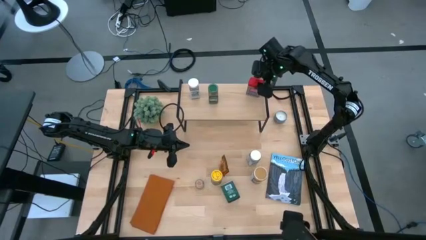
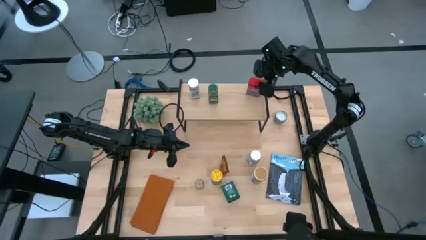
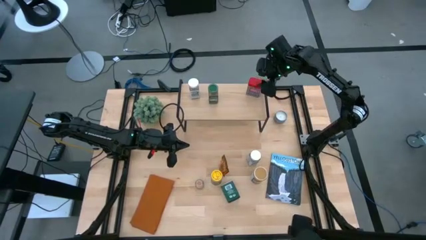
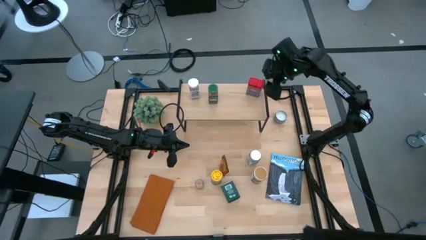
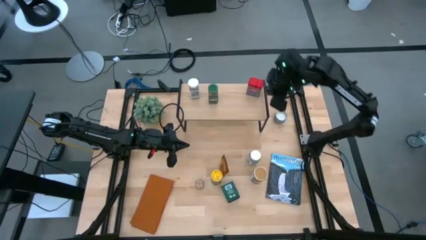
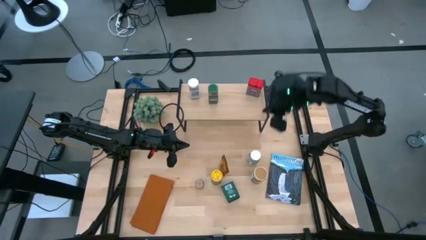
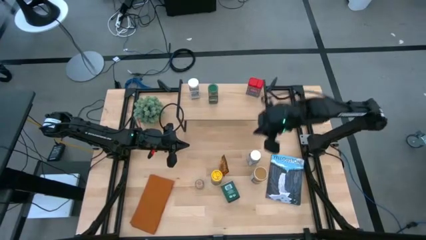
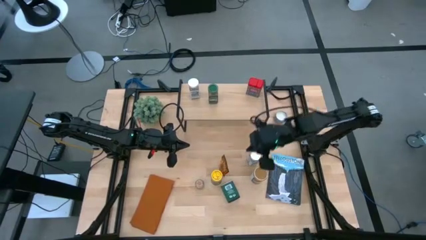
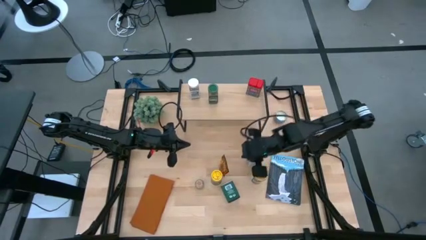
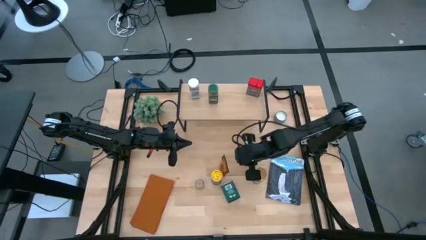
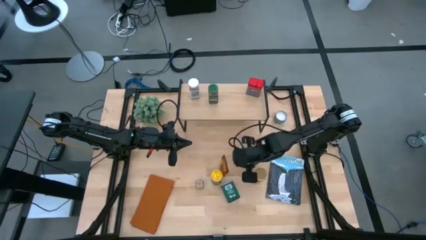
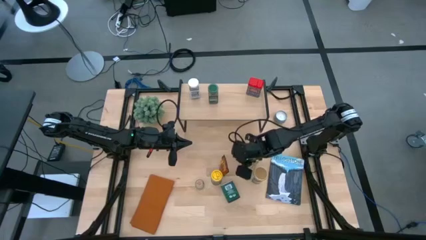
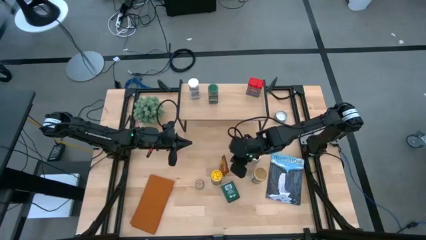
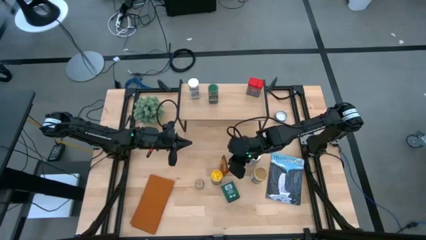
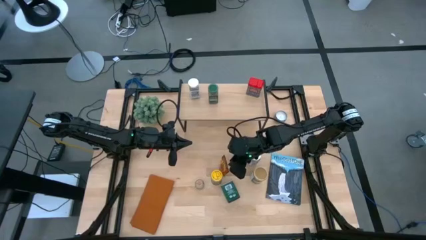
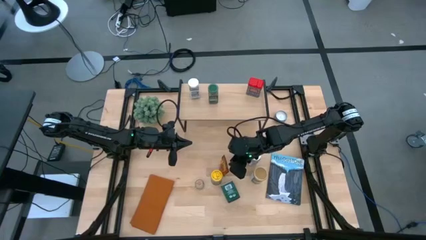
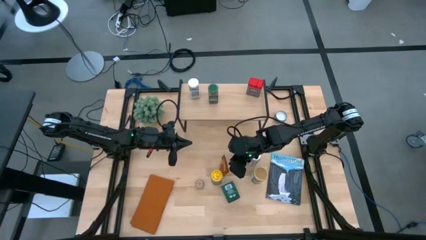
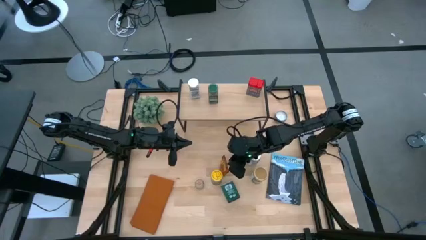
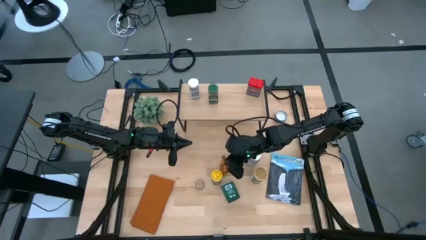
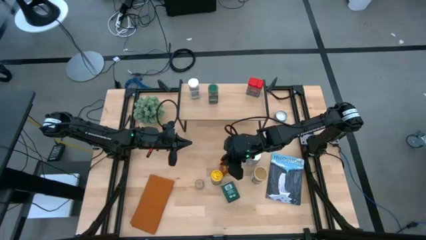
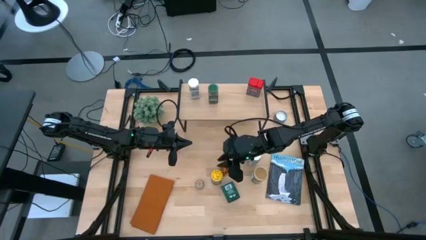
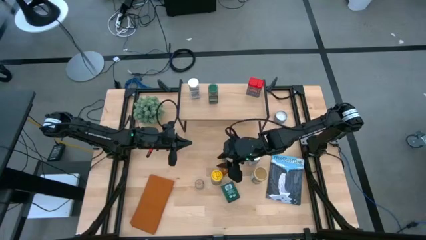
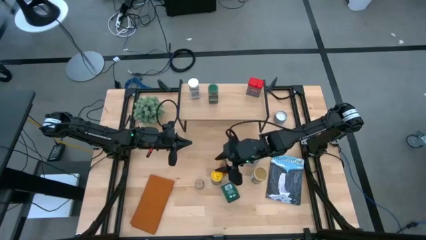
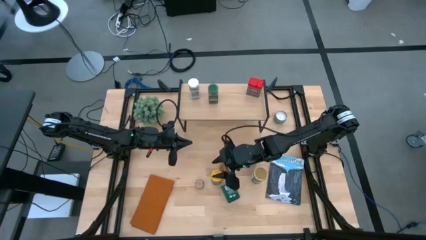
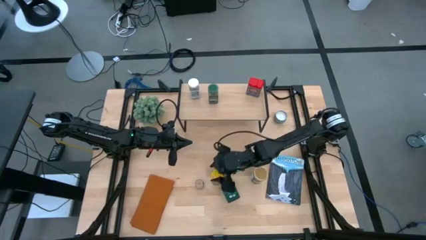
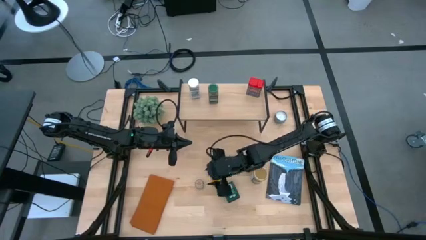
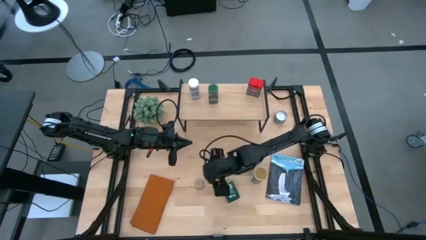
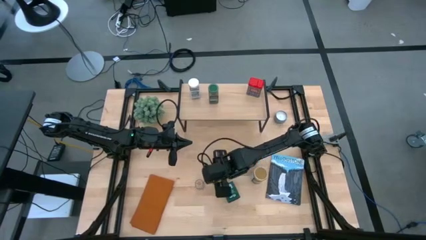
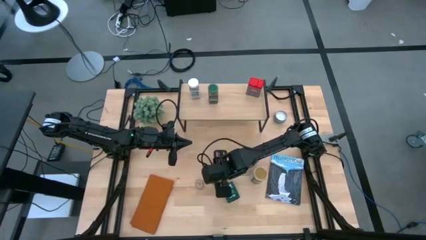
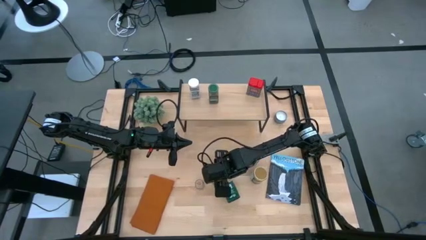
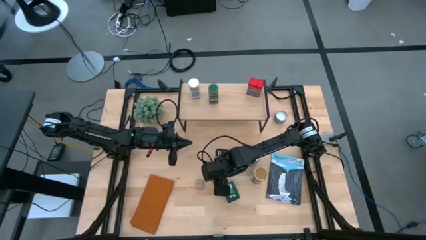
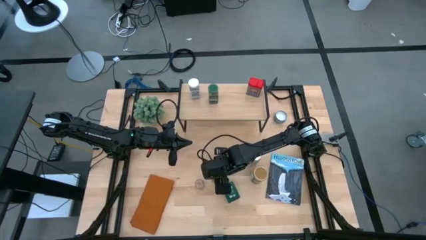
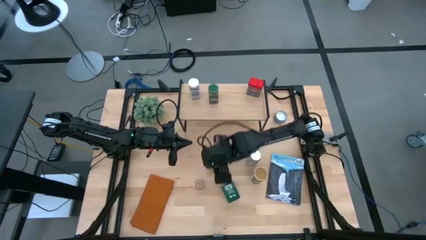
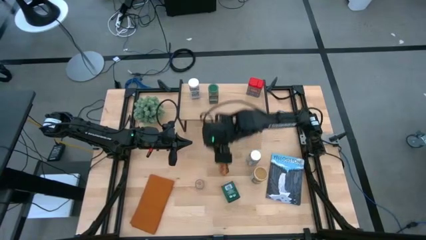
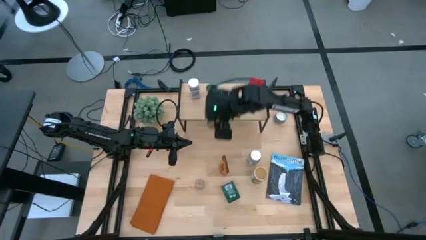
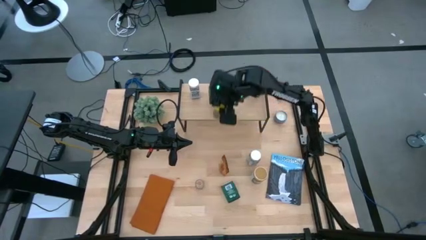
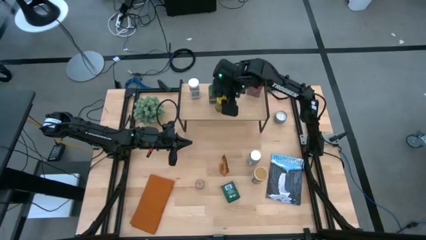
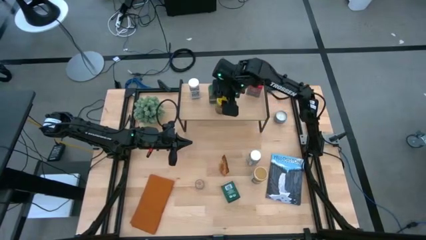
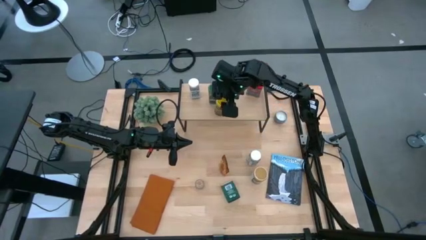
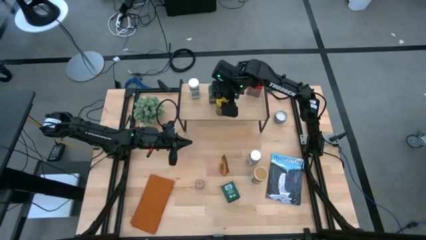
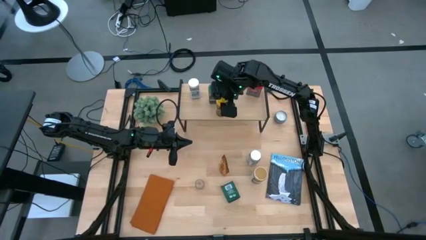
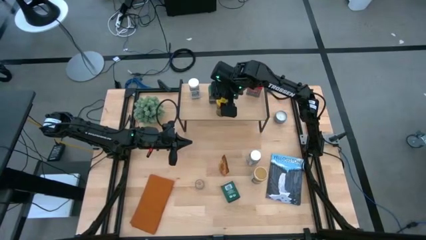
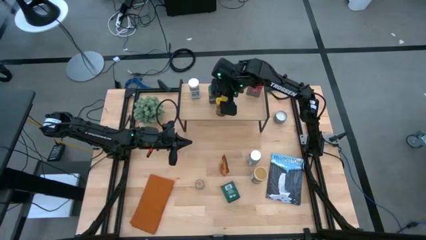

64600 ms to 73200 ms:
Task: Shelf spices
Put the yellow seasoning bottle on the shelf
